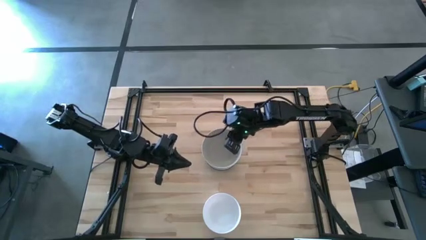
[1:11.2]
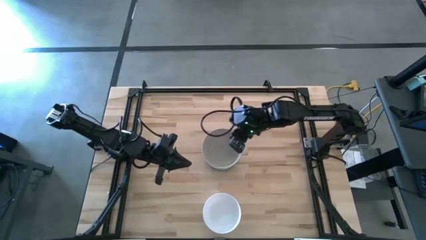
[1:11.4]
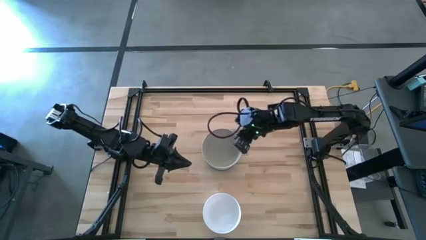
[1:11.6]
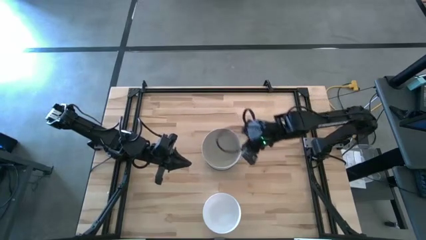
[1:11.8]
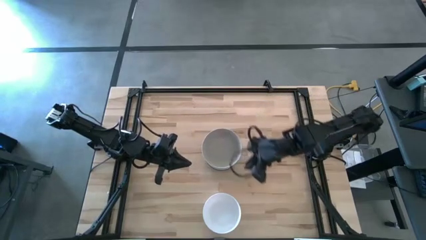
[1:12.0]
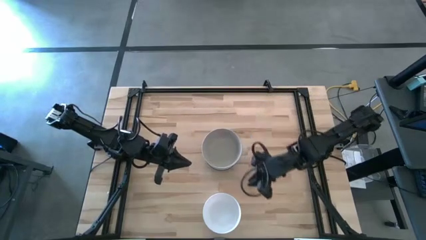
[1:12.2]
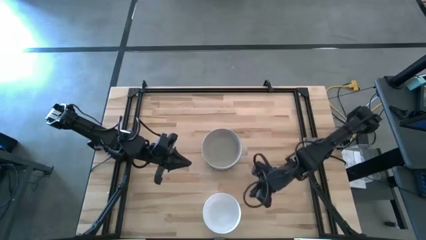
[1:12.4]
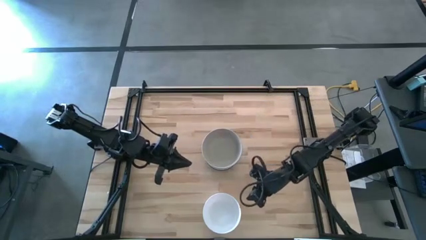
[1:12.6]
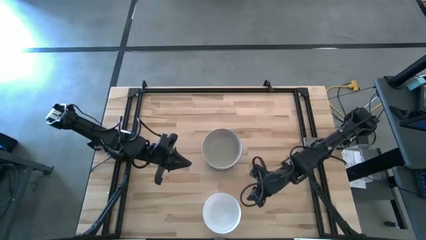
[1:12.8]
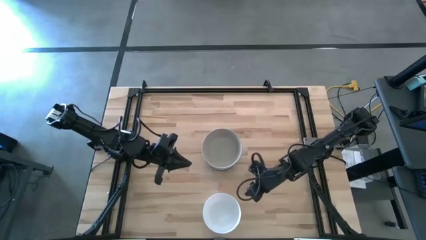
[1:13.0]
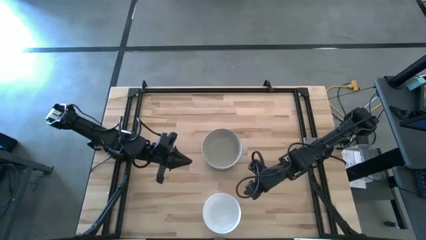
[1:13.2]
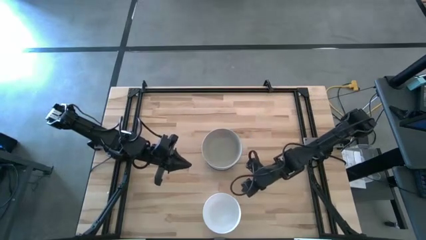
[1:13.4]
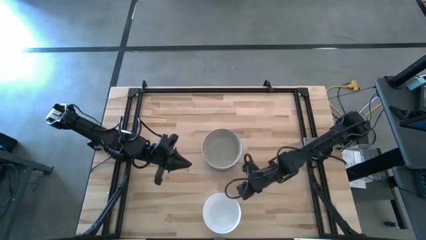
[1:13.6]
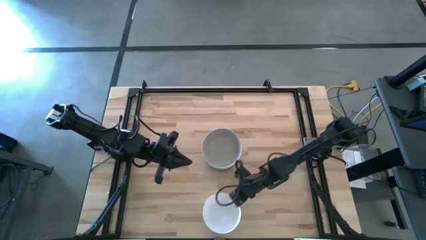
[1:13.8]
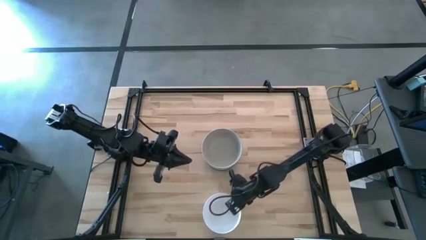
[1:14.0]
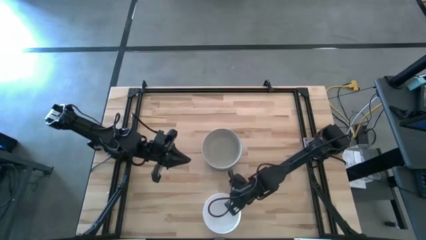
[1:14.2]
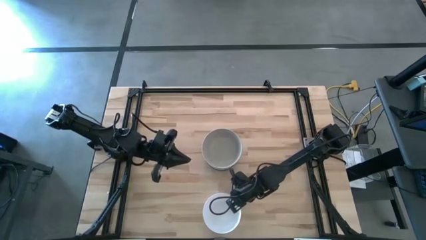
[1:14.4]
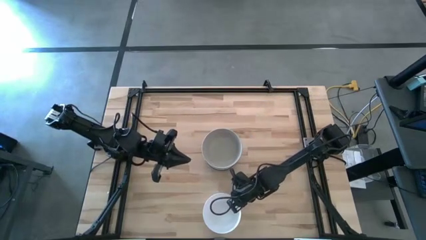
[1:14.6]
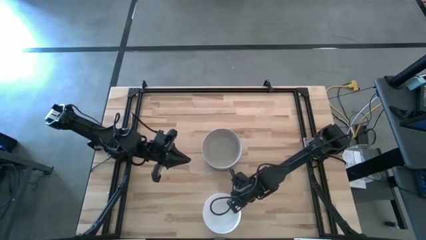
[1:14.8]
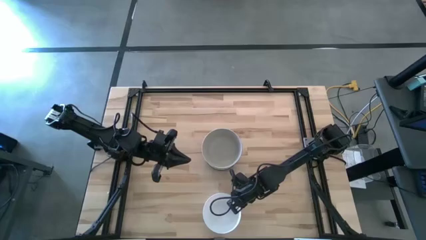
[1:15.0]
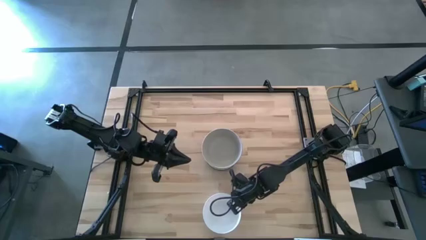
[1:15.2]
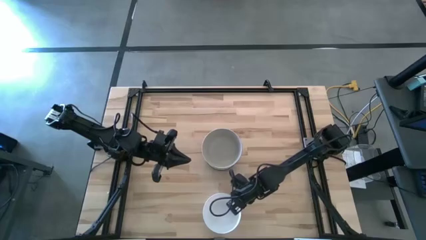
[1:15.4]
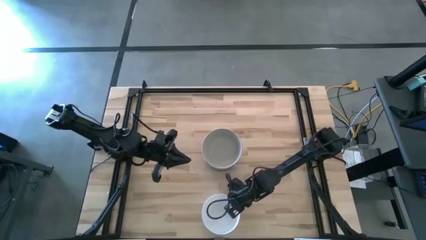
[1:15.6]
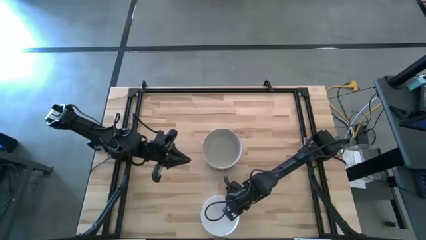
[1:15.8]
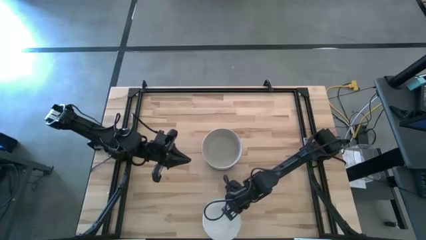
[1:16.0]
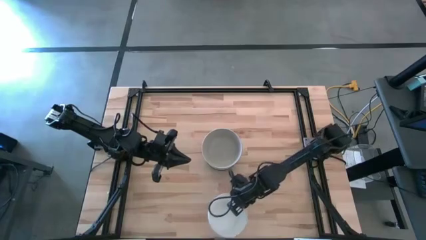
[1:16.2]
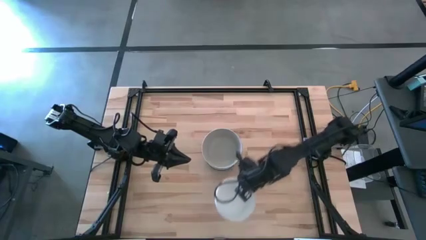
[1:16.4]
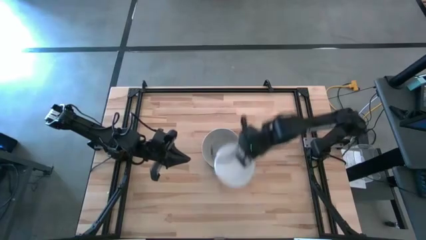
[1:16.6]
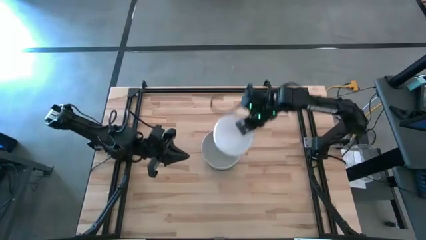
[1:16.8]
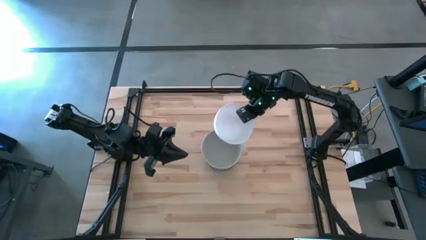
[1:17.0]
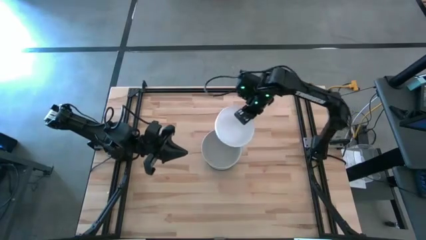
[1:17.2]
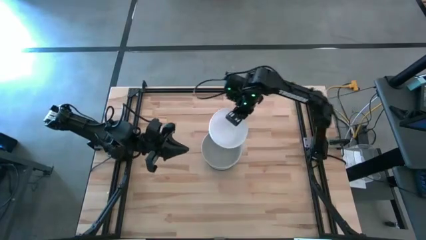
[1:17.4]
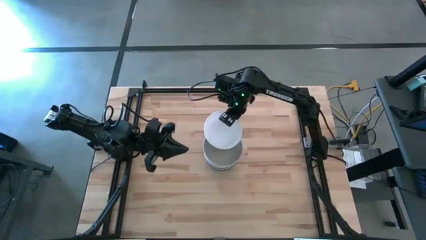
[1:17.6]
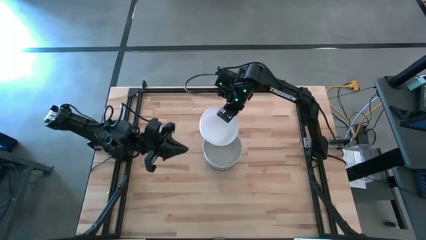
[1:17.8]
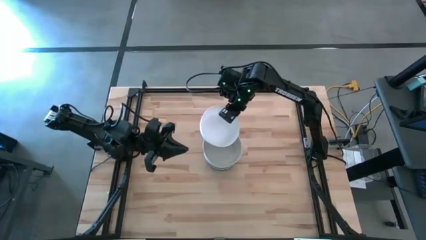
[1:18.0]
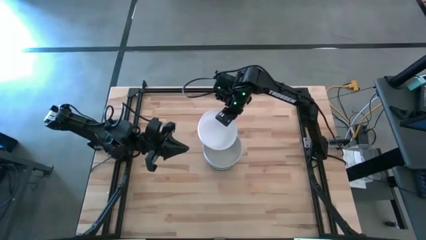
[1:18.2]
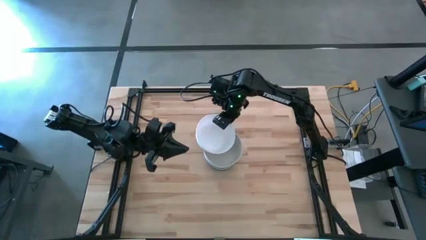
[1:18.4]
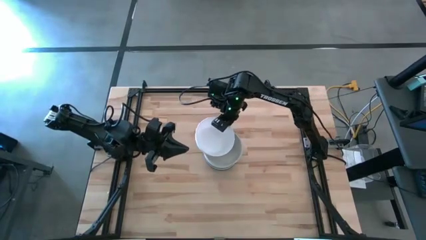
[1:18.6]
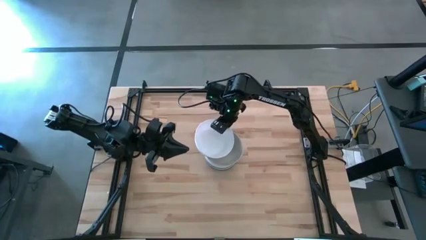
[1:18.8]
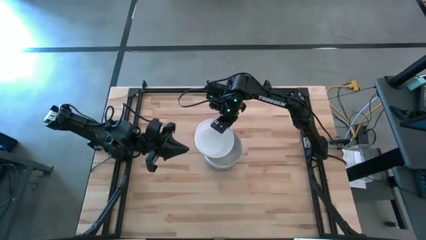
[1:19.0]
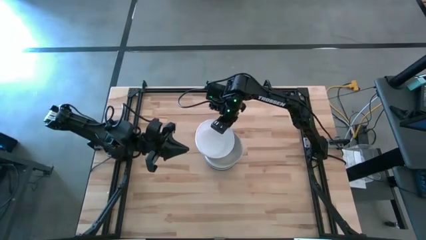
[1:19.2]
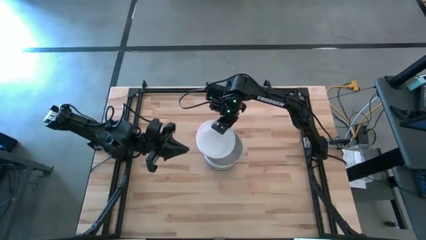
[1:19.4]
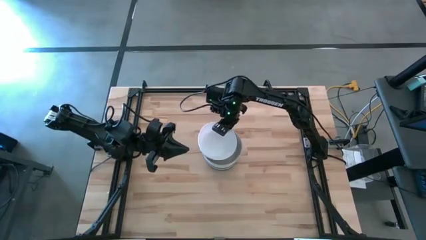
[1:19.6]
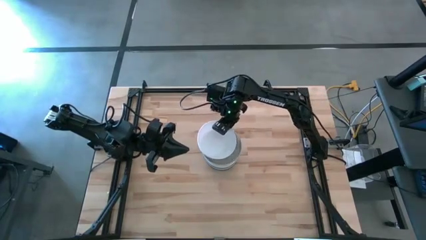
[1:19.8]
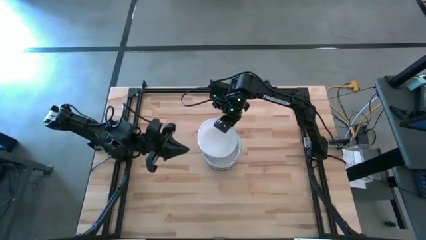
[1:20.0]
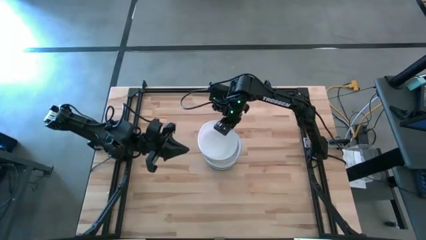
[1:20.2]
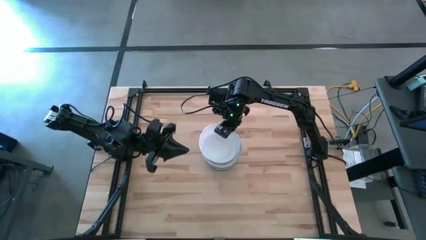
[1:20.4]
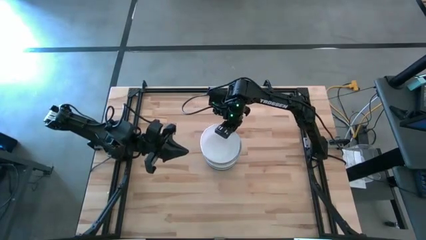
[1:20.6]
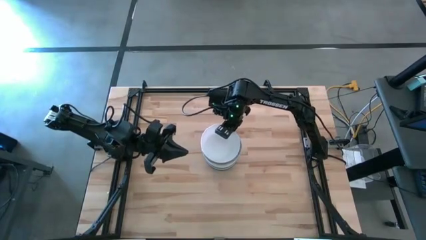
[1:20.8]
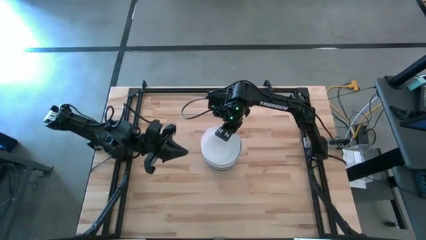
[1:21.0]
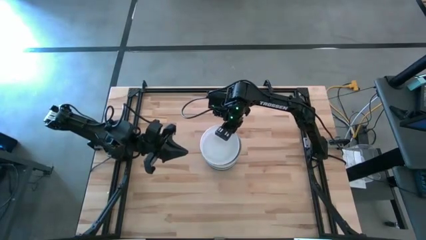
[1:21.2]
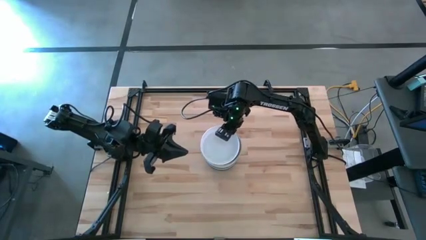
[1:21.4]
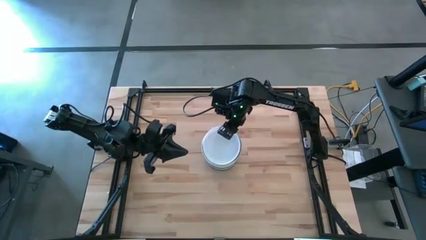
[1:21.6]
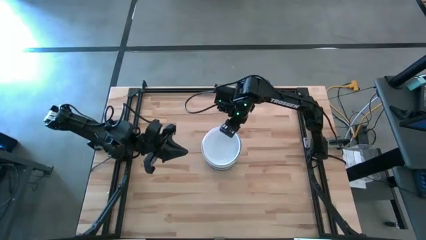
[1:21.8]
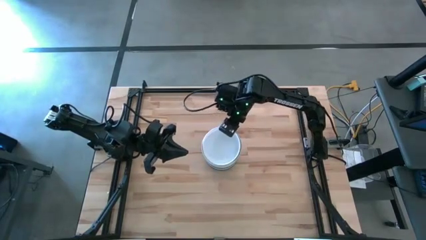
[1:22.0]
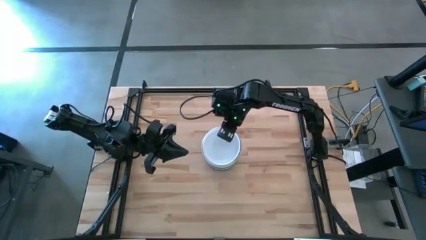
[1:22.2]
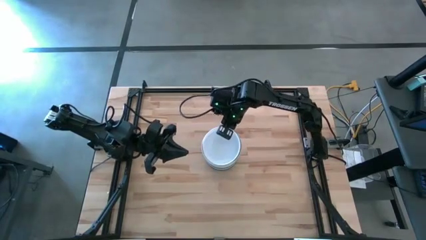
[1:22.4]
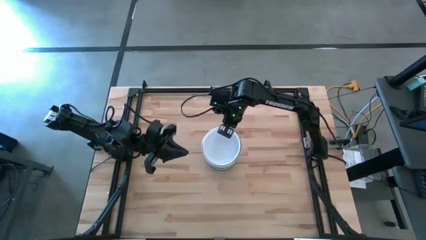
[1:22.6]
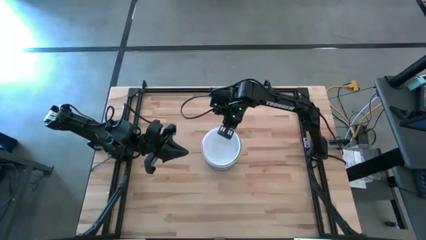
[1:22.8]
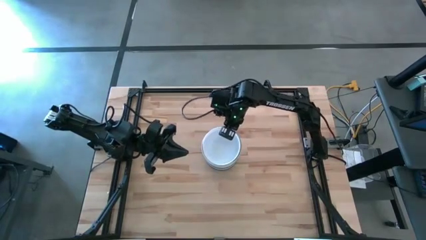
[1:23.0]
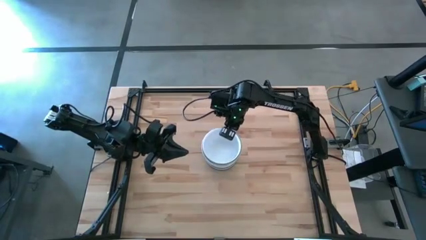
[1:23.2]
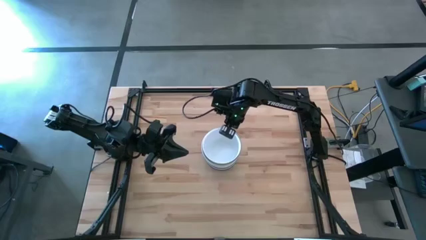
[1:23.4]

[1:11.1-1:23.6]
Task: Nest bowls inside each other
Stack the white bowl on top of the light brown bowl
